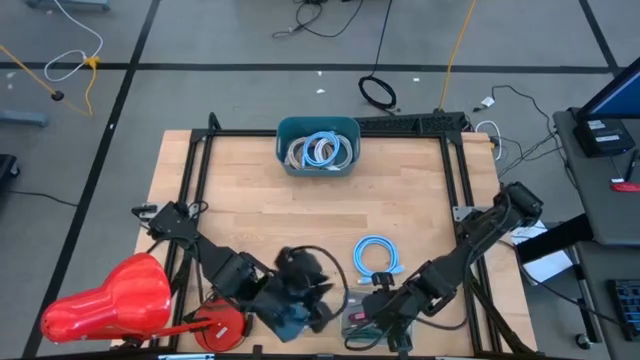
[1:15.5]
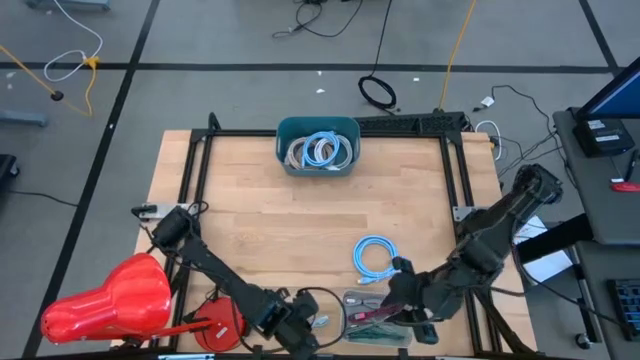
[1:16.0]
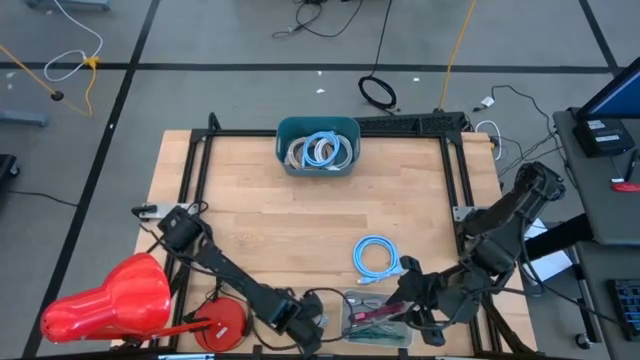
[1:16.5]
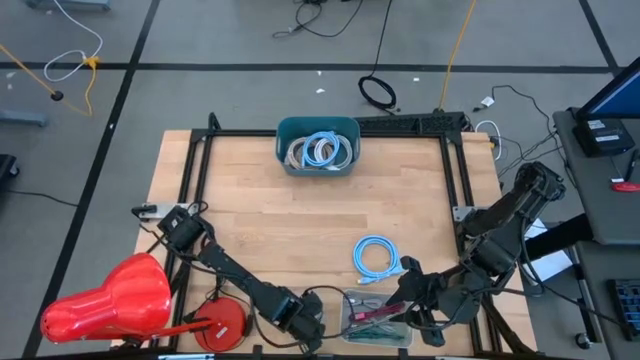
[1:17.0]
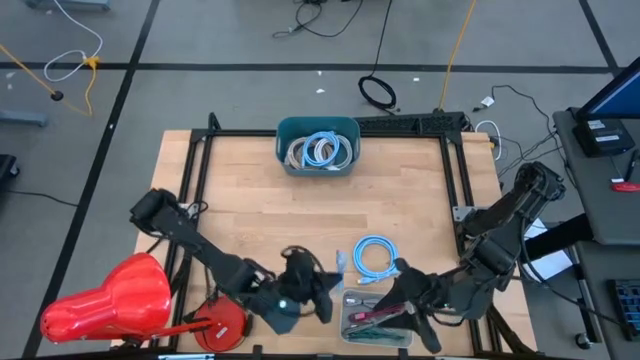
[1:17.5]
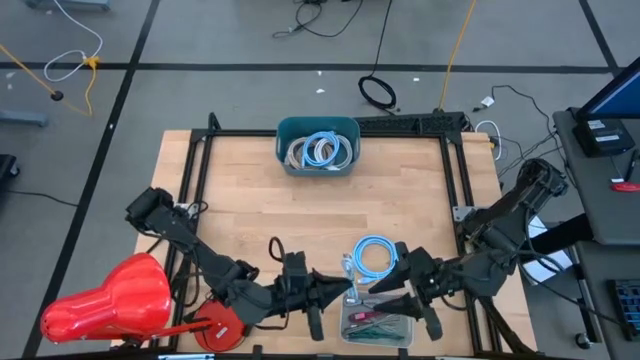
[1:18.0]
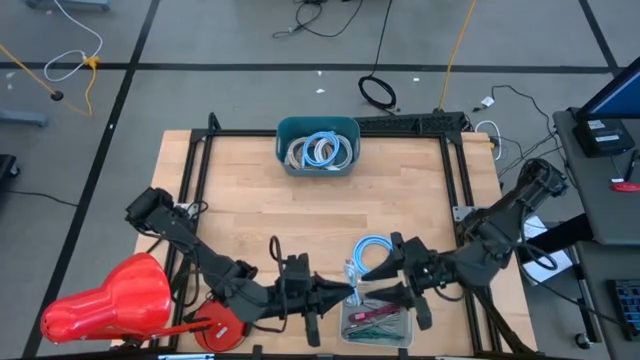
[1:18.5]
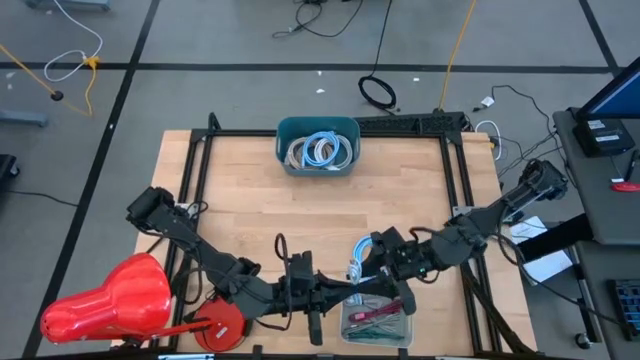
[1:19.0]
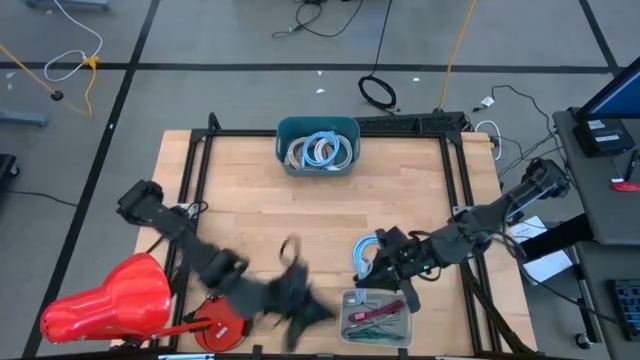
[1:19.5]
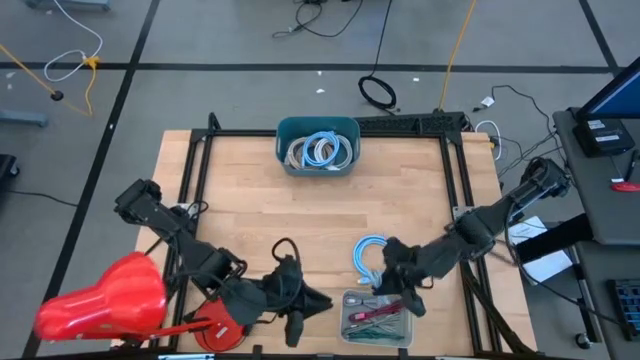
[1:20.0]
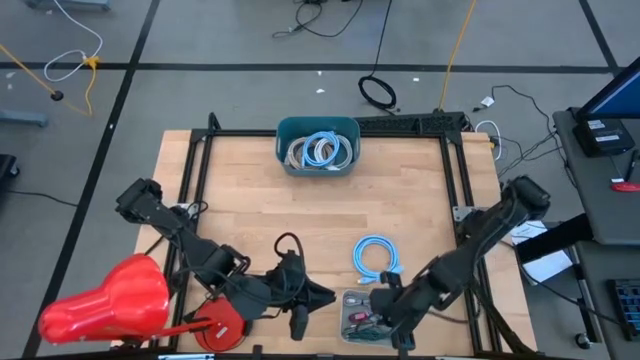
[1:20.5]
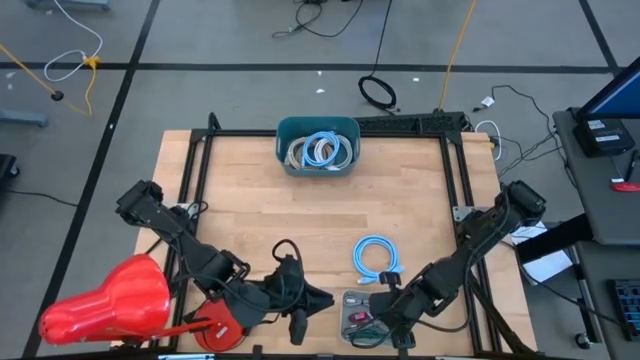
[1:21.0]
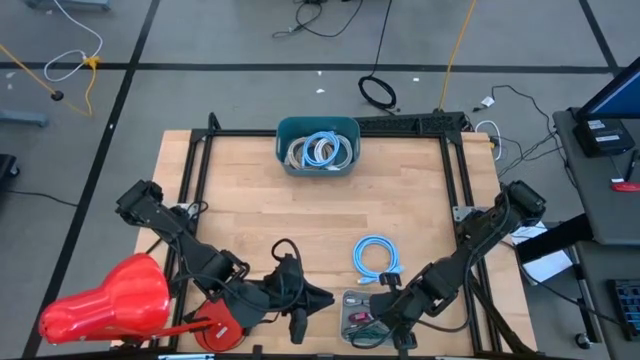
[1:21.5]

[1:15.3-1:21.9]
Task: Pick & Place USB Port
Put the light blue charger cable into the gray bin

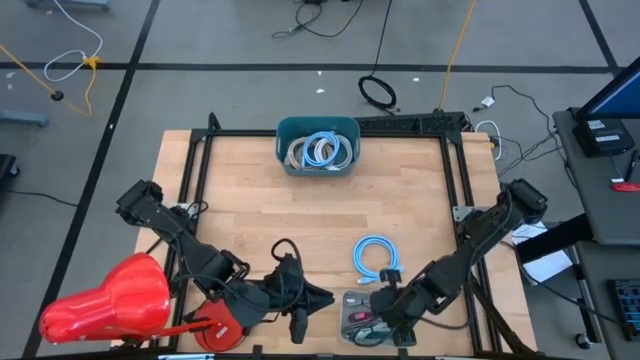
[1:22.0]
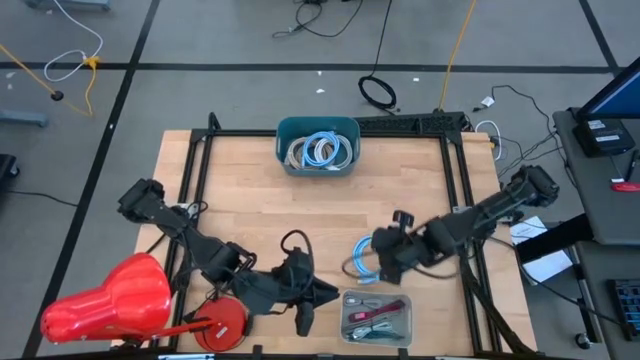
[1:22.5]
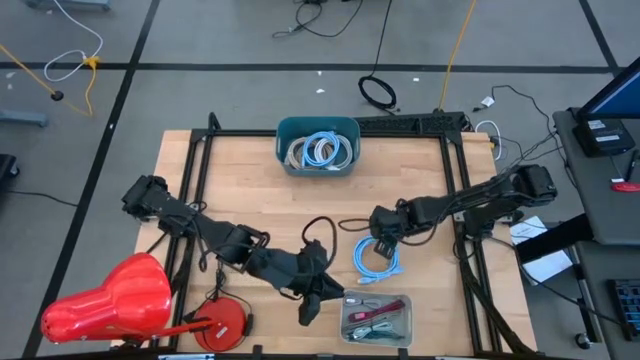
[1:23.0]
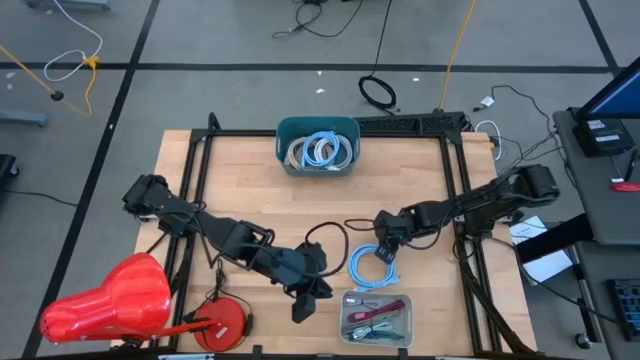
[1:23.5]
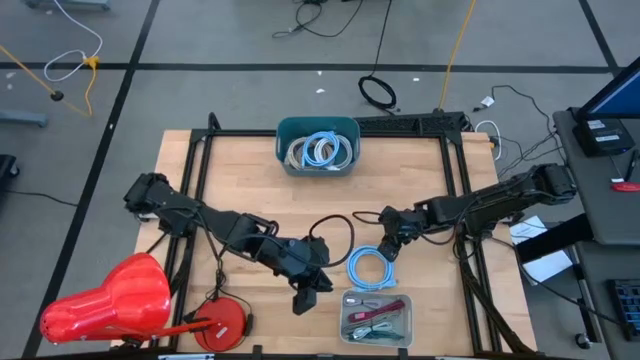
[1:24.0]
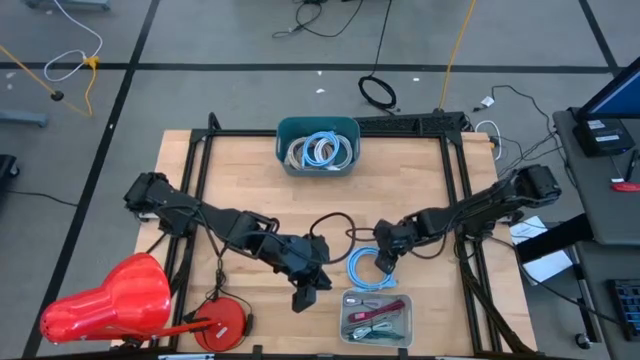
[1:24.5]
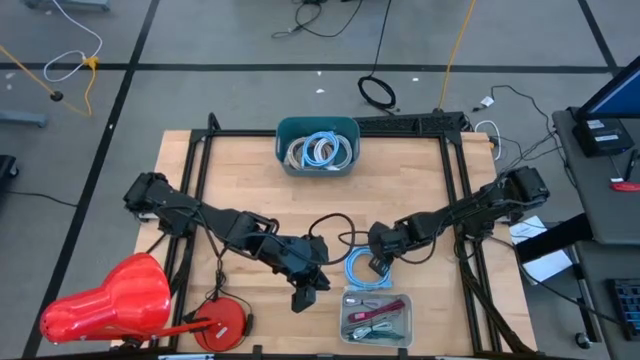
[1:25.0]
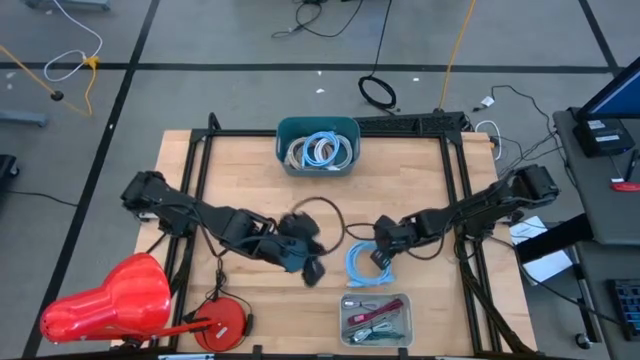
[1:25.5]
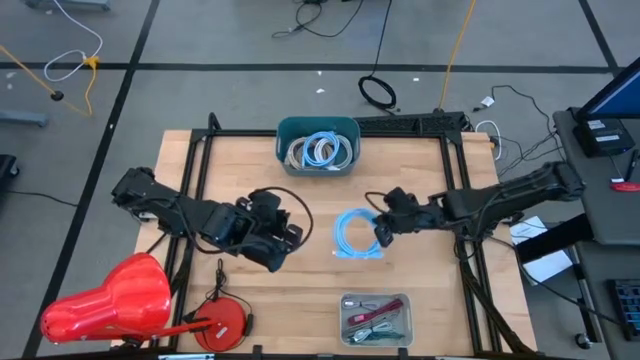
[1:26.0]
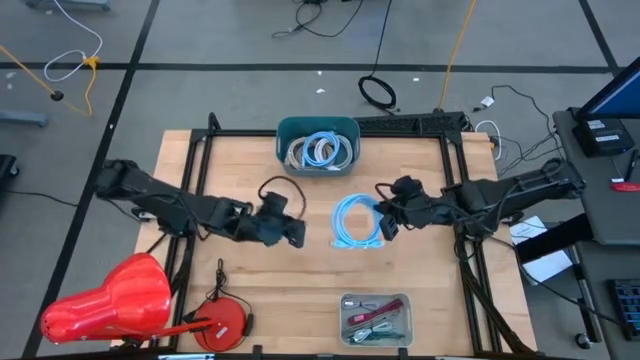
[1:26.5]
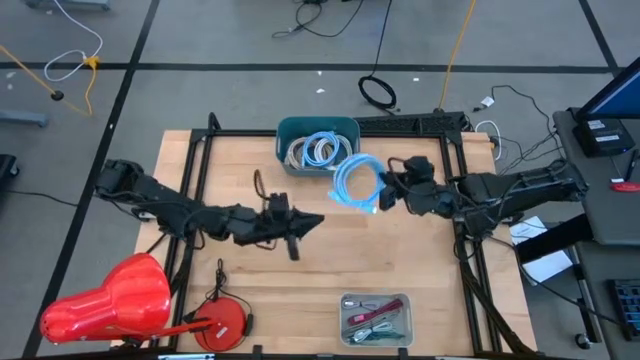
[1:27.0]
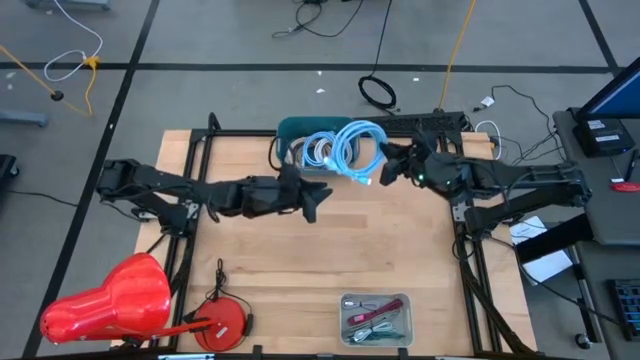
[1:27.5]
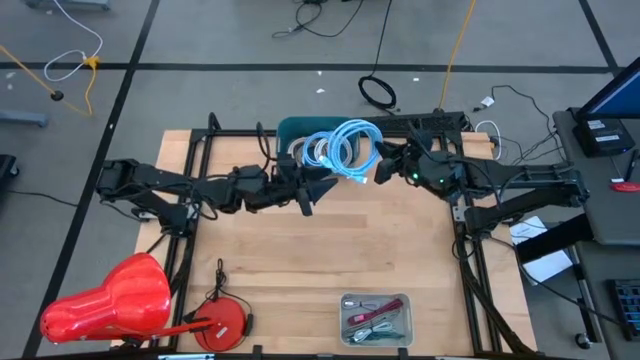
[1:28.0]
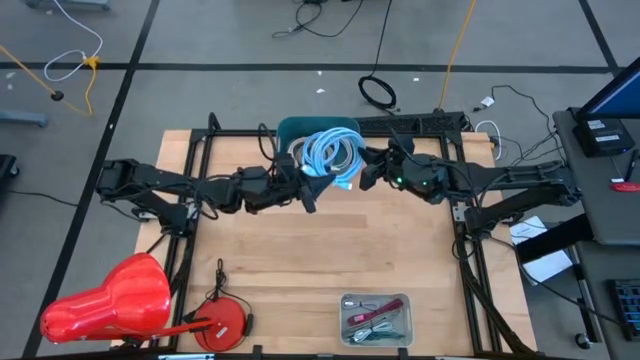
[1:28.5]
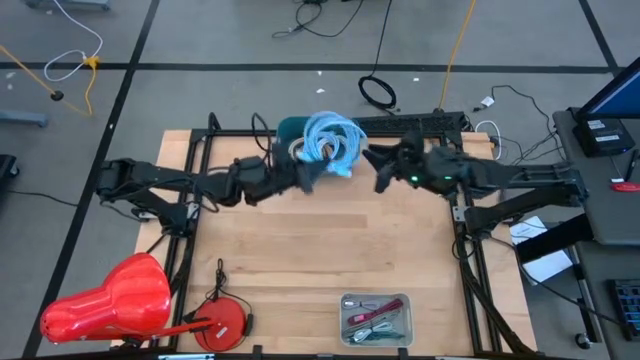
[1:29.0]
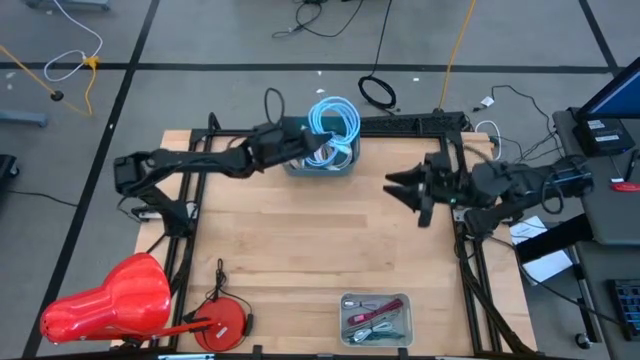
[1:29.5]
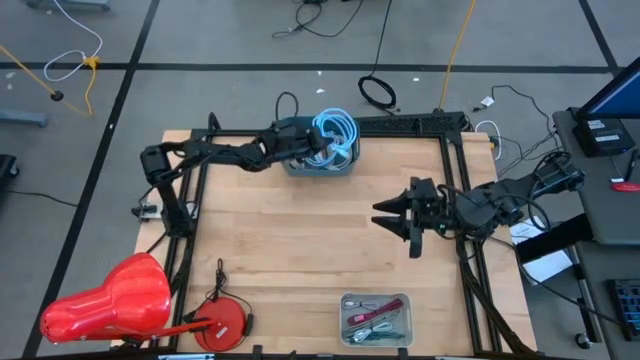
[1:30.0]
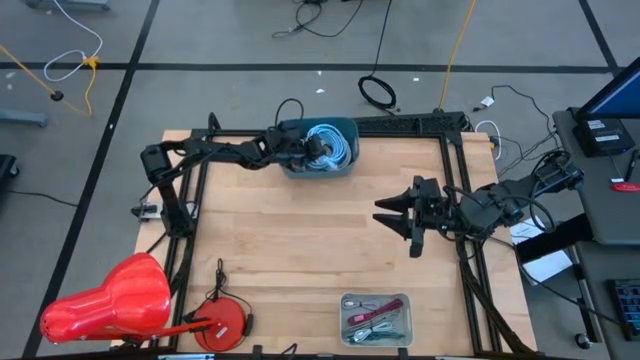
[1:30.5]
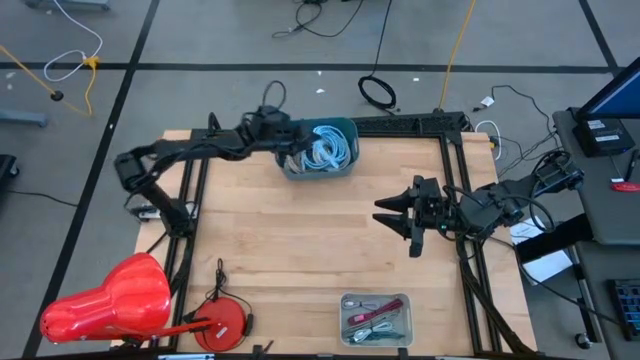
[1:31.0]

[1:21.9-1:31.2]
Put the blue HDMI cable into the blue bin

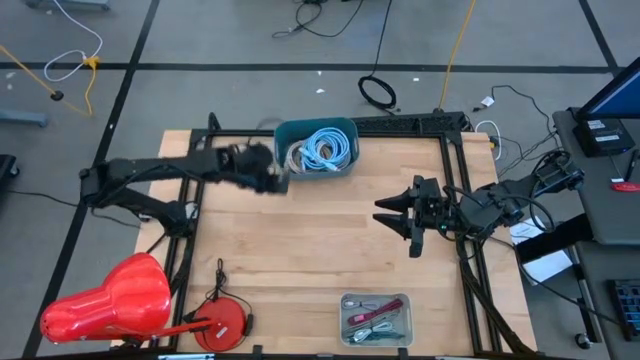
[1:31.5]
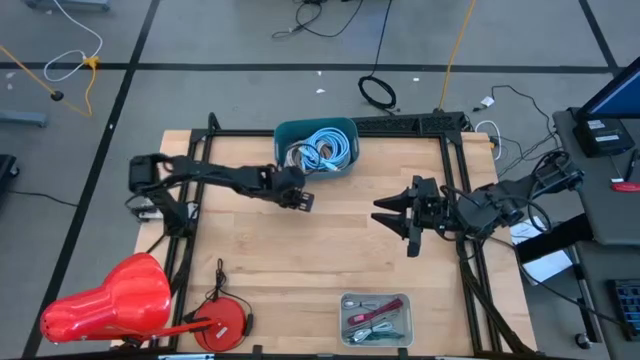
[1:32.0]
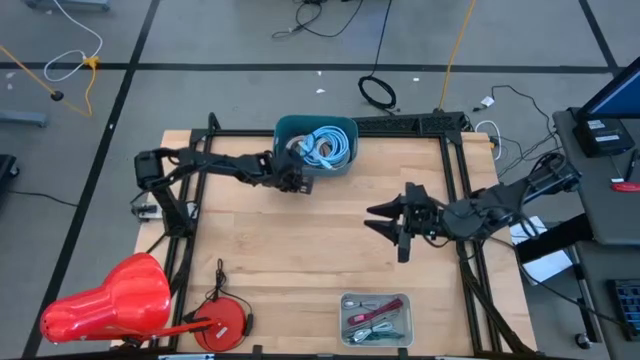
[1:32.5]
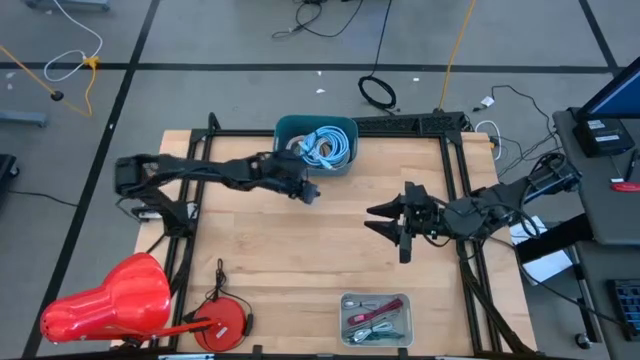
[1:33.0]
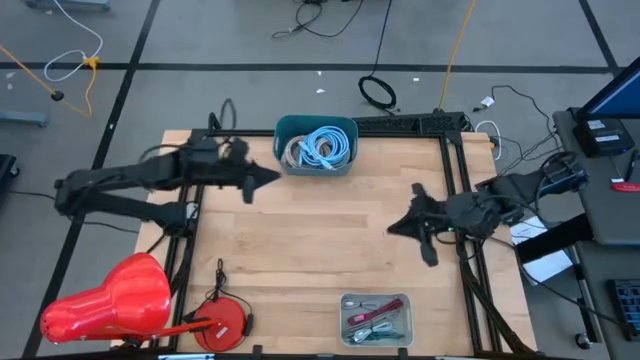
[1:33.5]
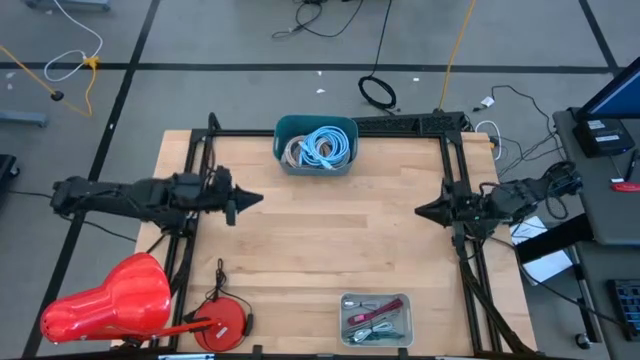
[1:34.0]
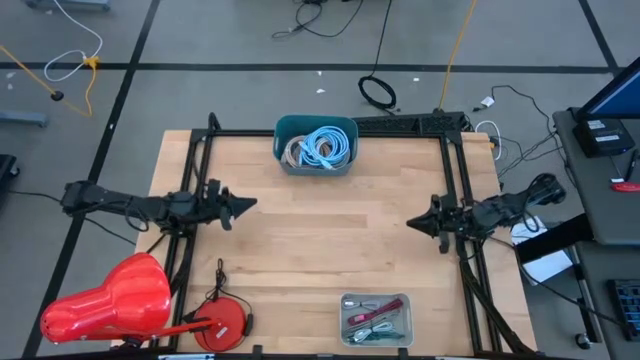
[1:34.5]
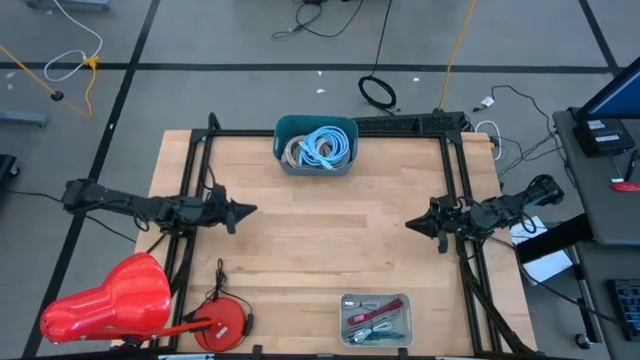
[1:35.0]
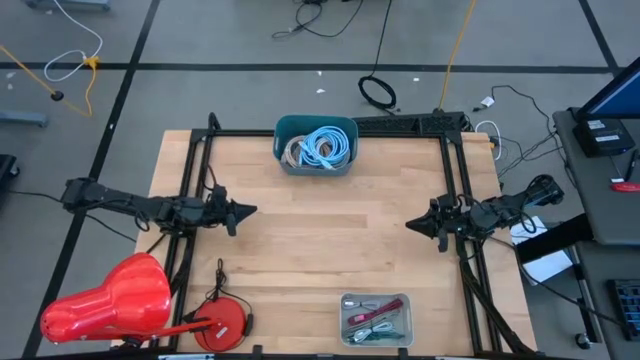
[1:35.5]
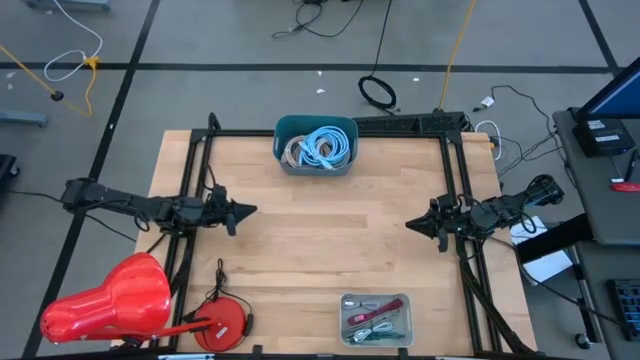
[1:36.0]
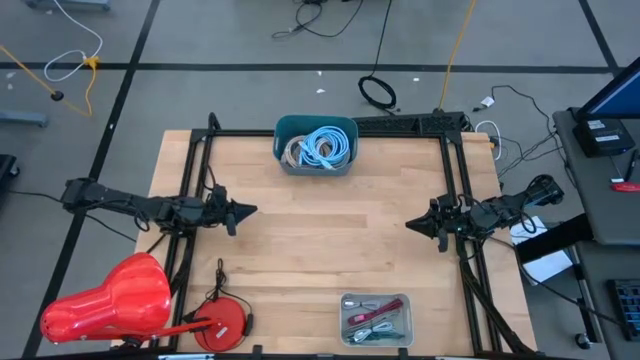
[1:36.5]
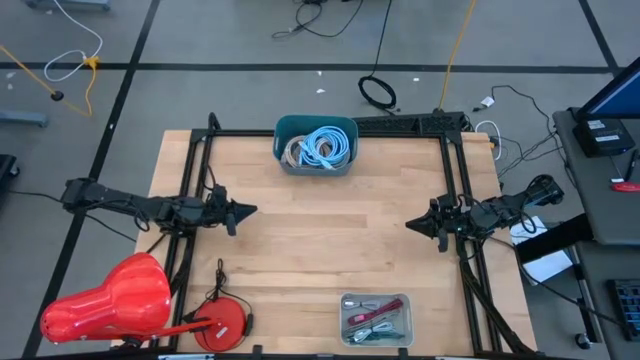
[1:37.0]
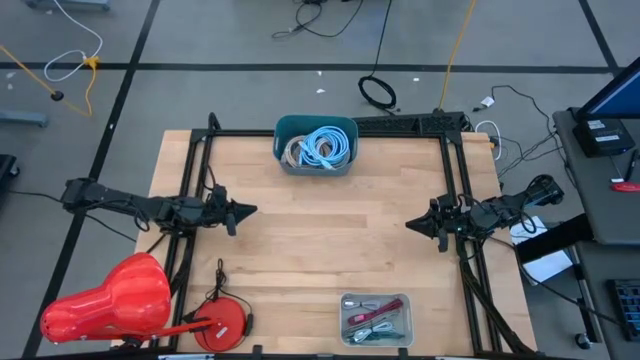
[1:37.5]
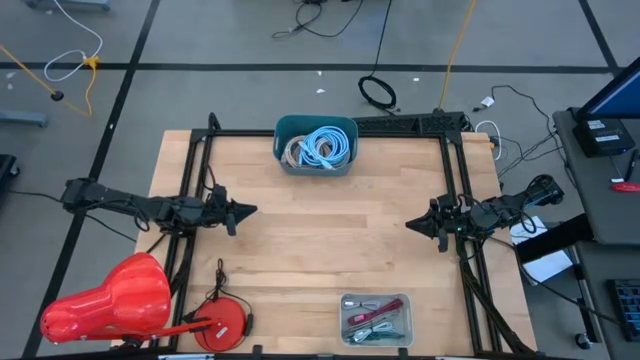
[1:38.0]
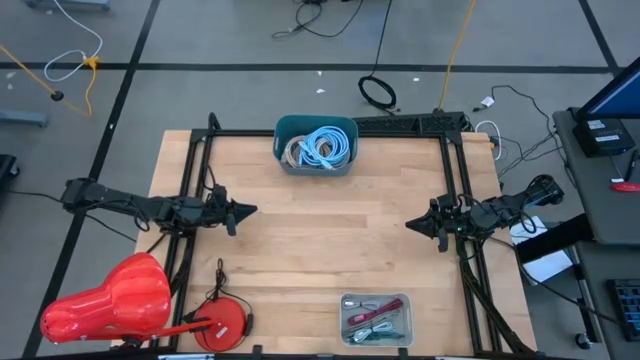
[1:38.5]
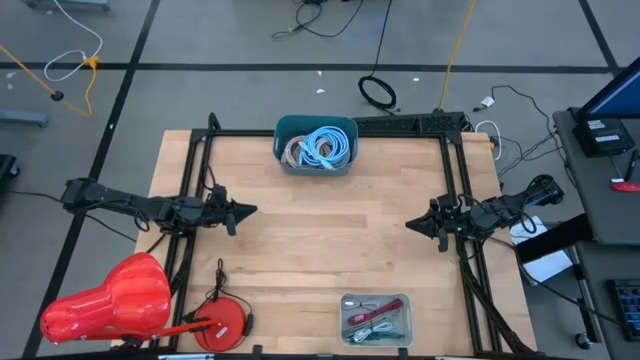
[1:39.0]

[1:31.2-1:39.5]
Return to Home Position
